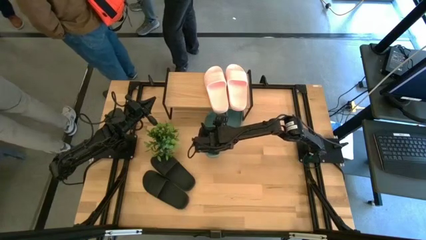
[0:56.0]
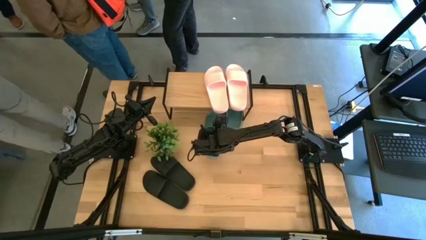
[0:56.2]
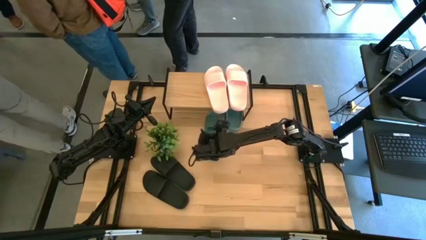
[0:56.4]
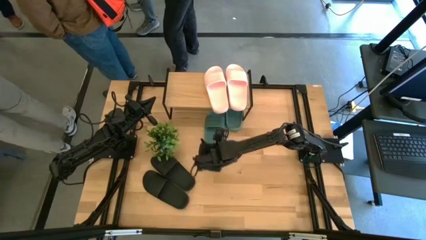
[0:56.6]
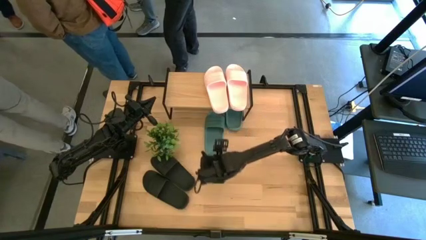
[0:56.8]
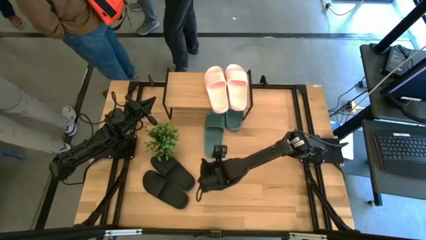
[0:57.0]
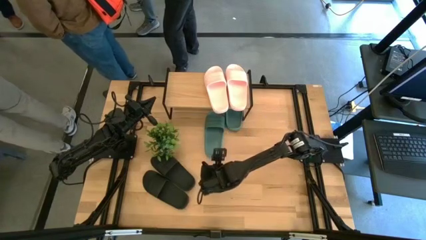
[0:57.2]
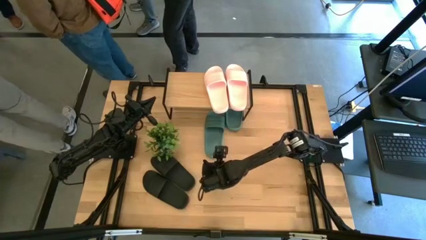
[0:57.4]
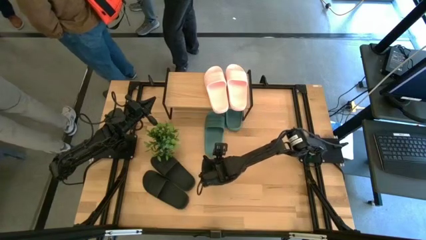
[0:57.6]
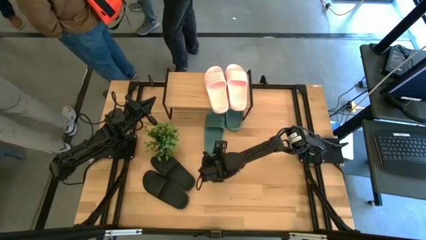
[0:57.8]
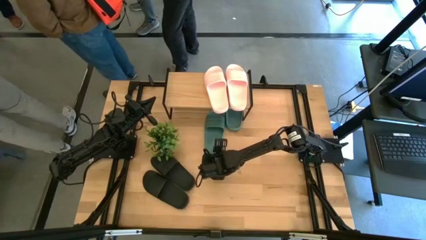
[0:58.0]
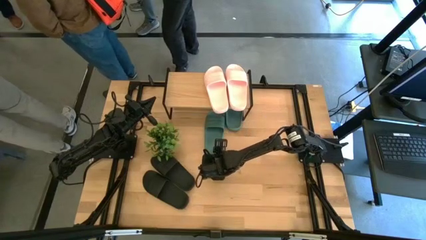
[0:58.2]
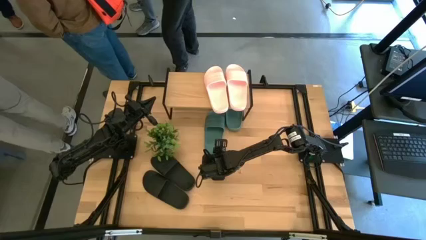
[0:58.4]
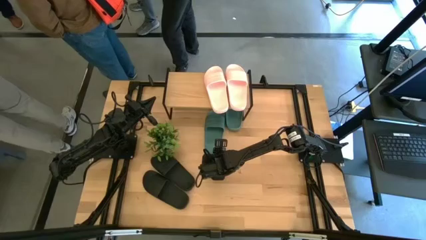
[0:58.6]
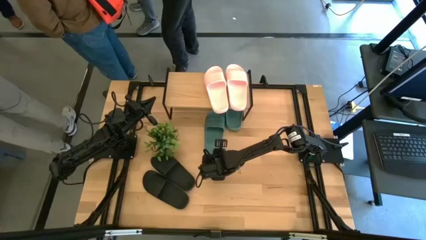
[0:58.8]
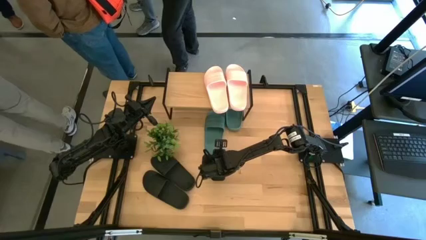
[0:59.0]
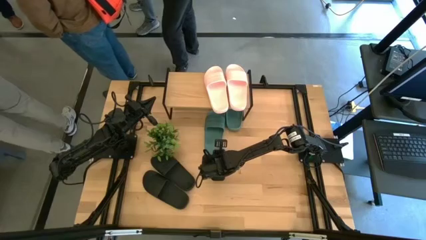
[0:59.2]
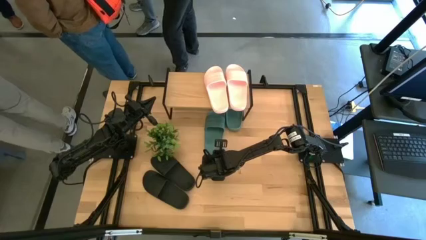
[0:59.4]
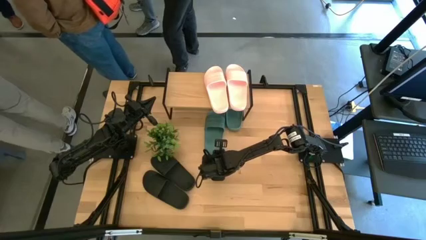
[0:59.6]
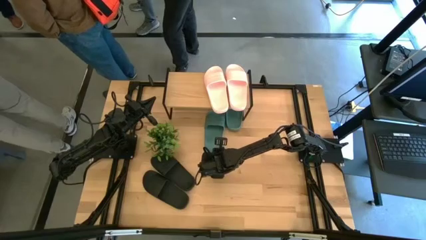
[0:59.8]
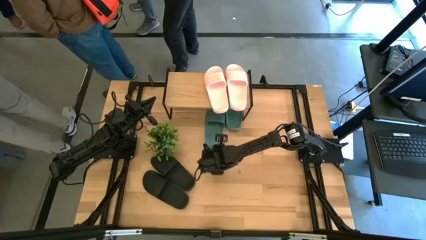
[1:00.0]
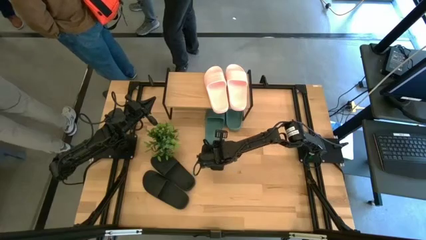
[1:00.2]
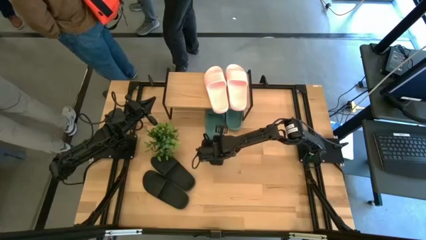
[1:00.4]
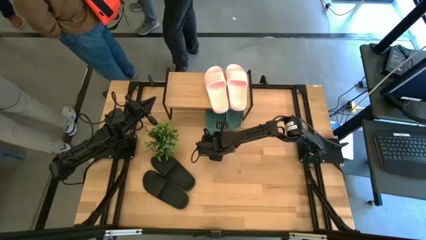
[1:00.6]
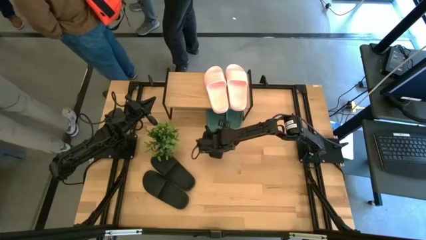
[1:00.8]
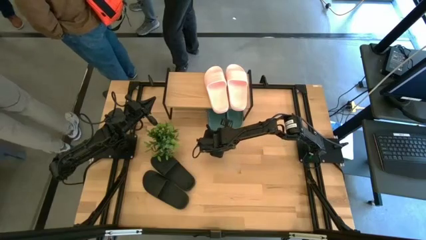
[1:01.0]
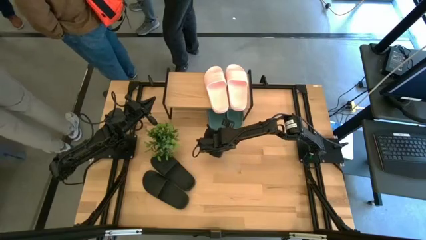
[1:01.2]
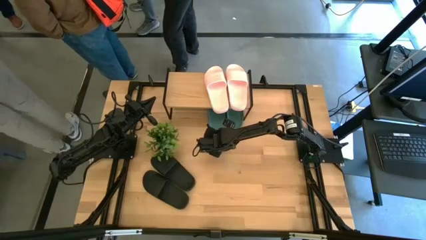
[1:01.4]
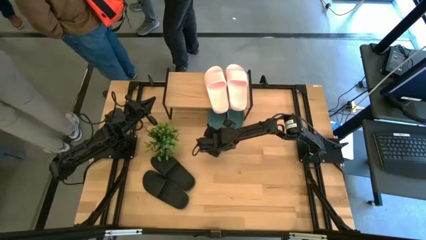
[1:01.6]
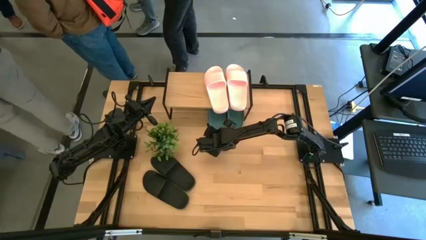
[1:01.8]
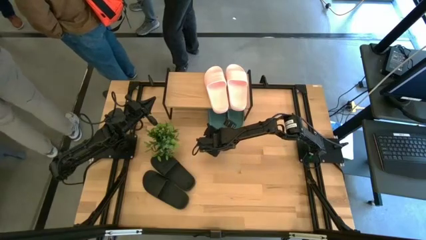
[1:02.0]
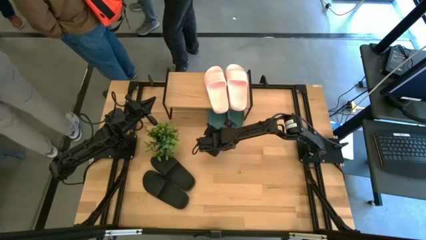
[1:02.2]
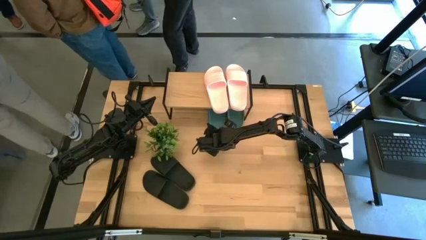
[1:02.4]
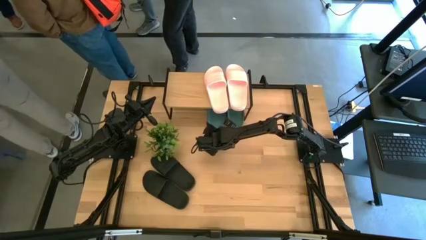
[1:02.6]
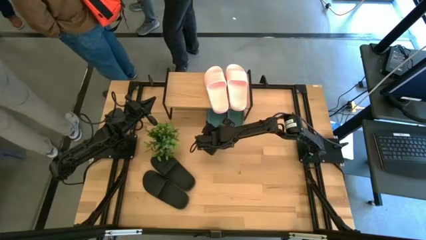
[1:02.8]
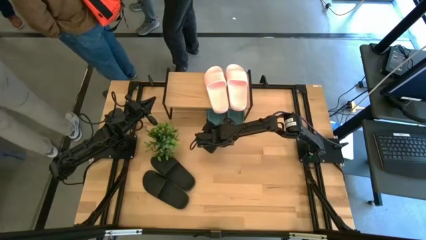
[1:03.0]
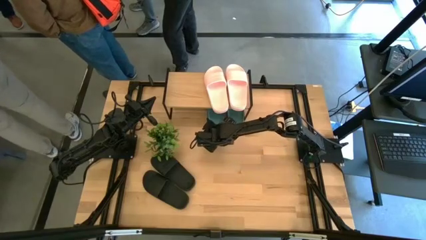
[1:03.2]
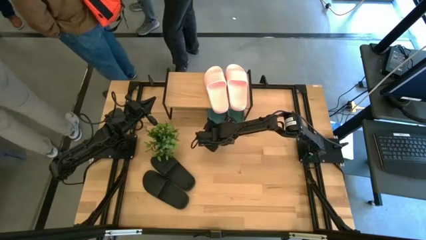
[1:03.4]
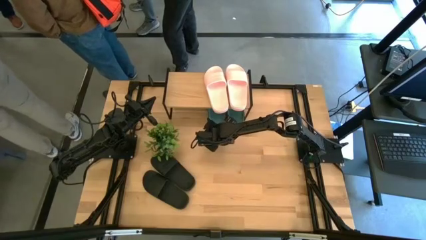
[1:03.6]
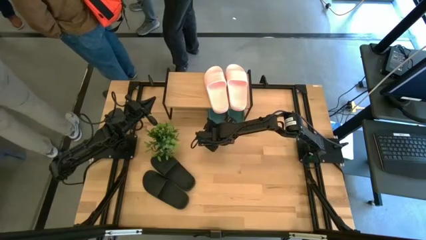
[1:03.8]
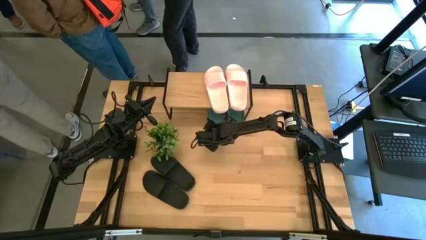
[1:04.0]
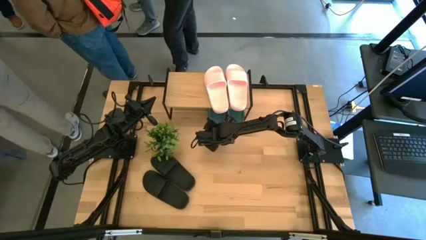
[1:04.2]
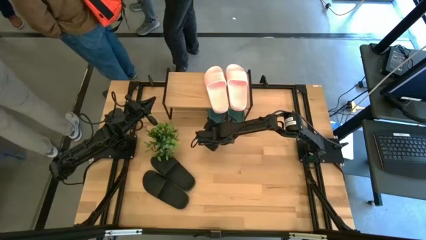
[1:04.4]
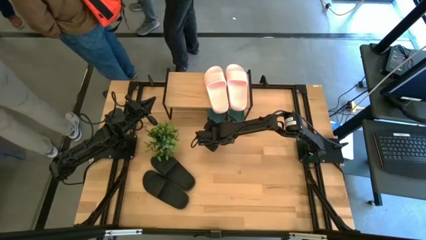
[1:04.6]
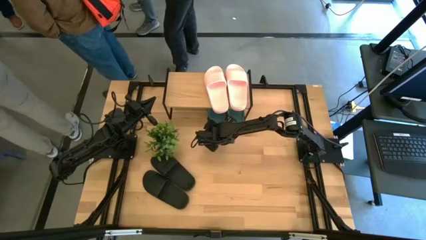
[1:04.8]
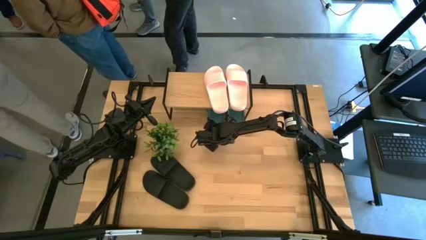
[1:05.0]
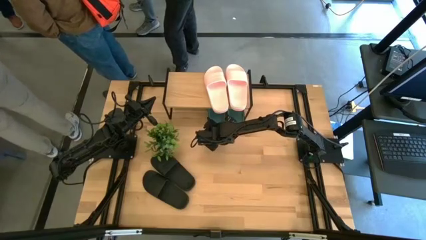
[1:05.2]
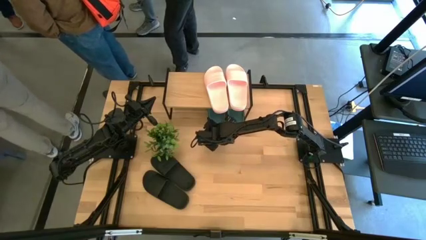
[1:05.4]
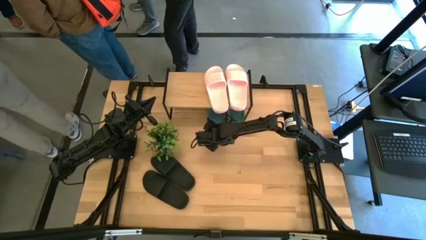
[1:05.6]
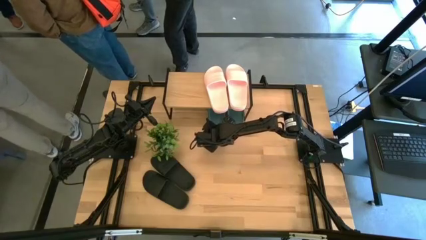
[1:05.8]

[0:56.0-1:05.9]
Task: Pick and place slides into the shelf
Put the green slide under the shelf

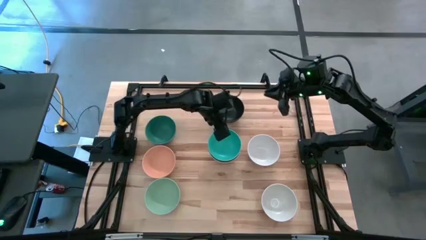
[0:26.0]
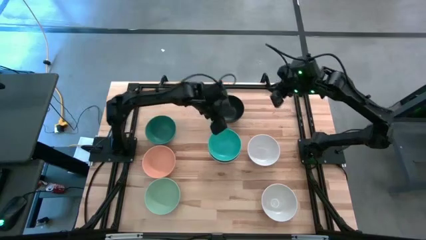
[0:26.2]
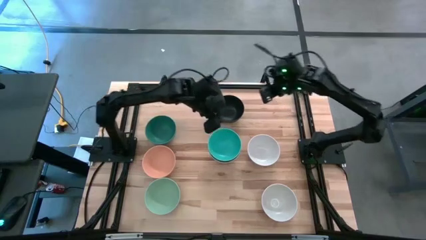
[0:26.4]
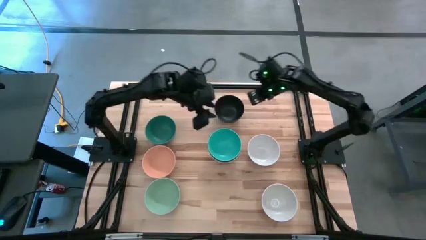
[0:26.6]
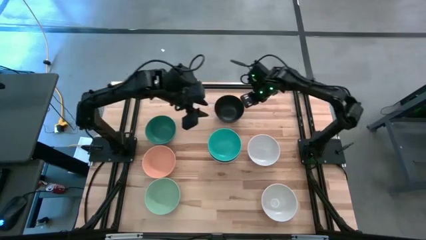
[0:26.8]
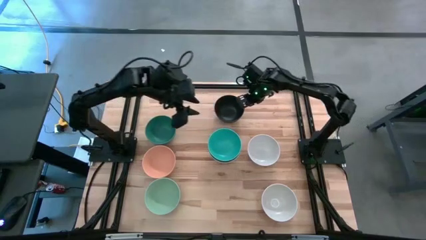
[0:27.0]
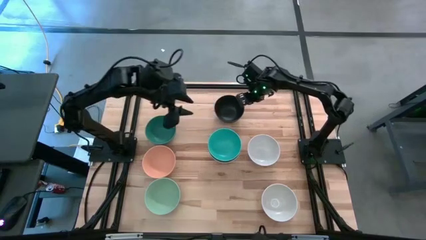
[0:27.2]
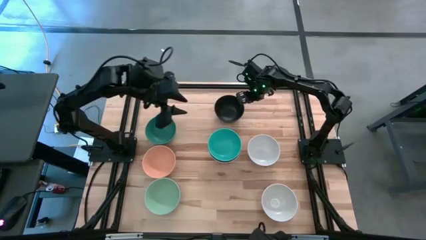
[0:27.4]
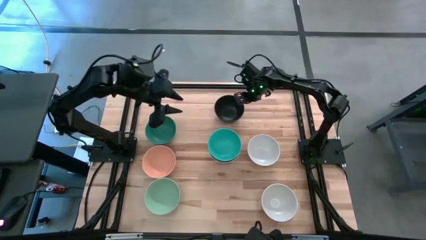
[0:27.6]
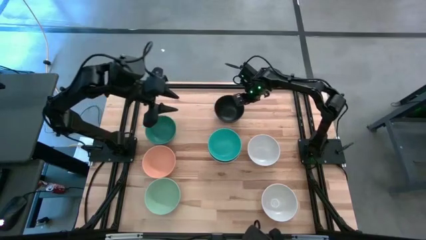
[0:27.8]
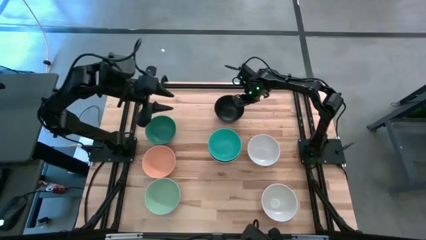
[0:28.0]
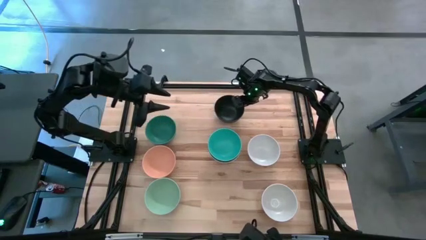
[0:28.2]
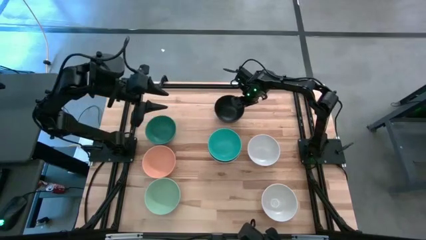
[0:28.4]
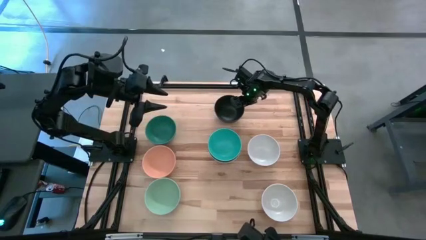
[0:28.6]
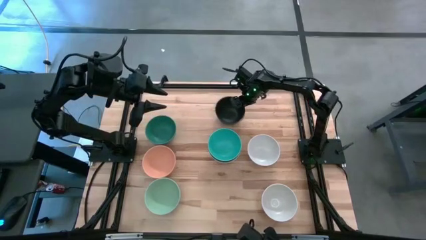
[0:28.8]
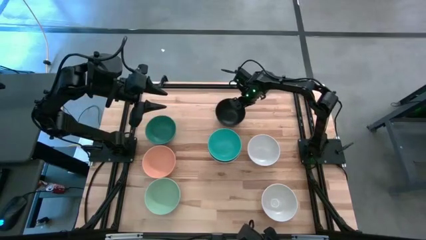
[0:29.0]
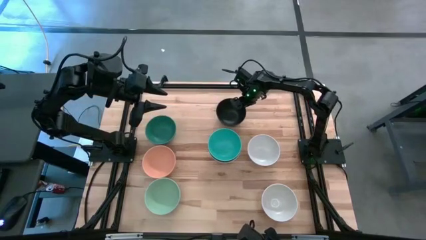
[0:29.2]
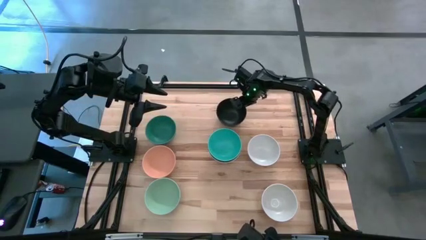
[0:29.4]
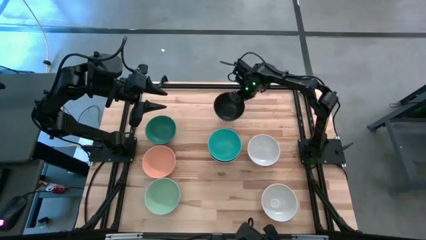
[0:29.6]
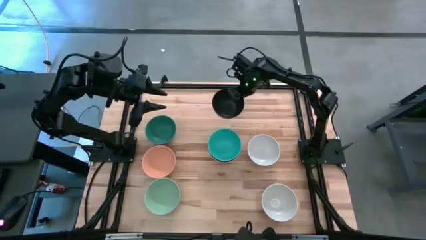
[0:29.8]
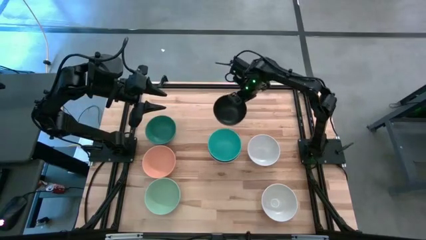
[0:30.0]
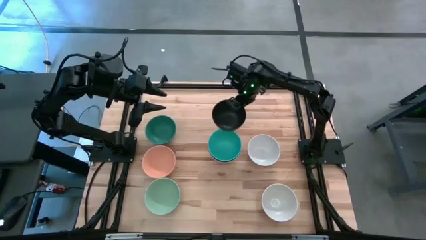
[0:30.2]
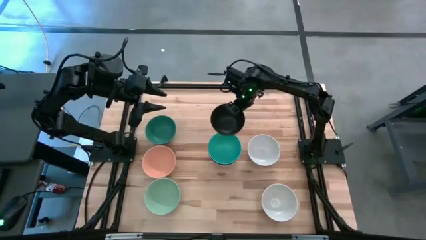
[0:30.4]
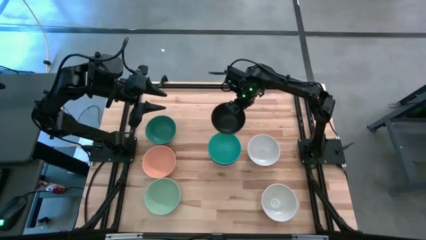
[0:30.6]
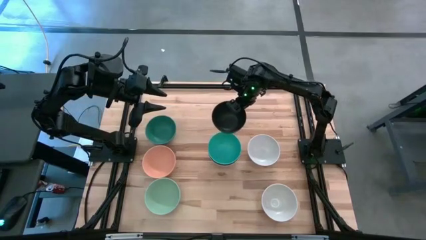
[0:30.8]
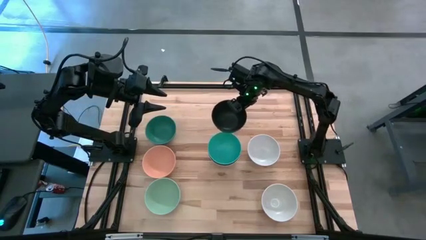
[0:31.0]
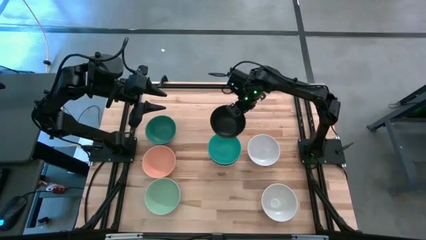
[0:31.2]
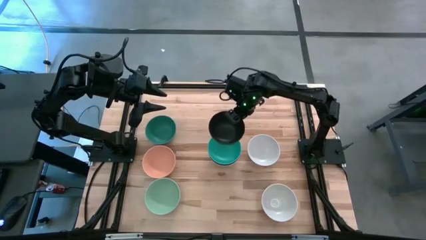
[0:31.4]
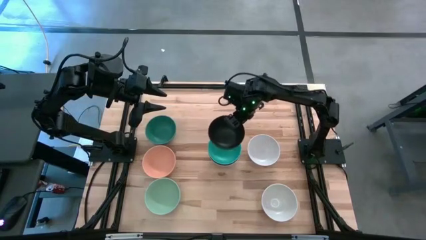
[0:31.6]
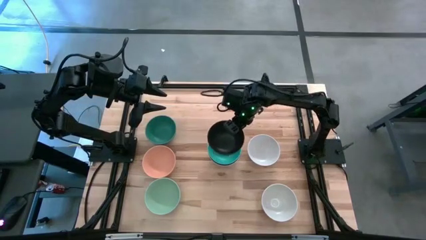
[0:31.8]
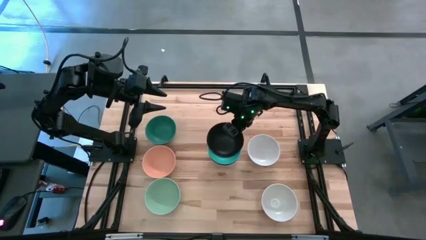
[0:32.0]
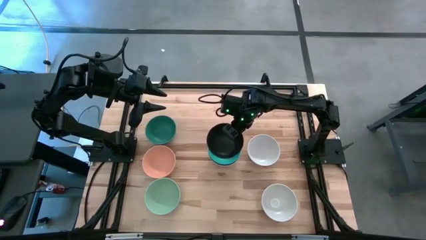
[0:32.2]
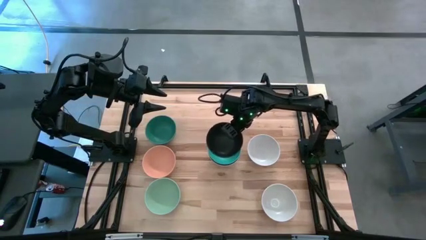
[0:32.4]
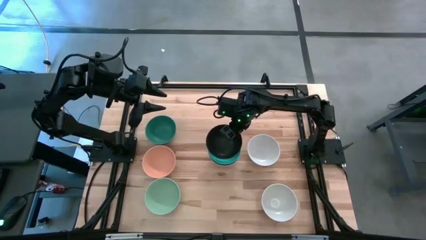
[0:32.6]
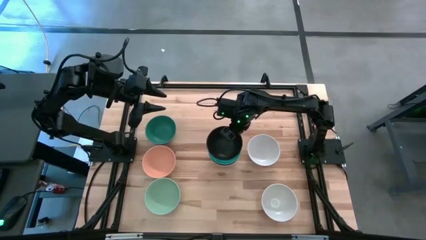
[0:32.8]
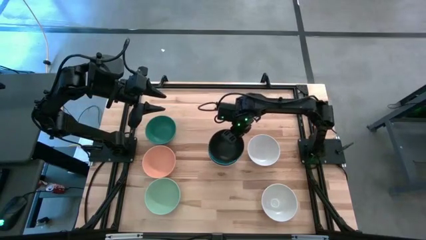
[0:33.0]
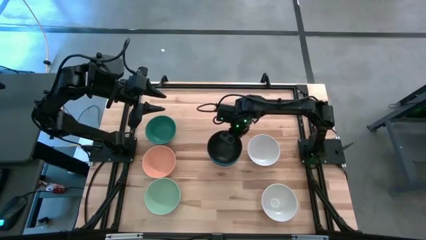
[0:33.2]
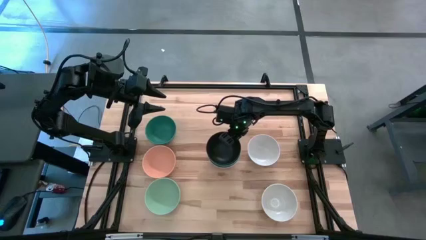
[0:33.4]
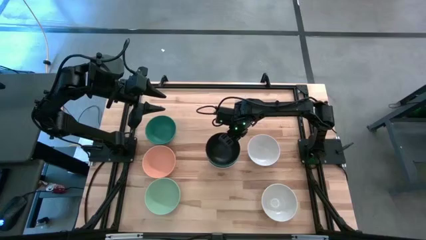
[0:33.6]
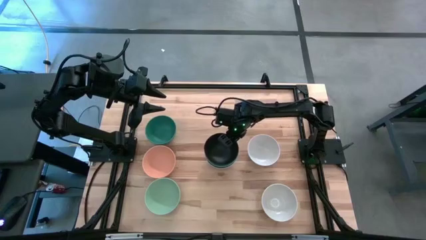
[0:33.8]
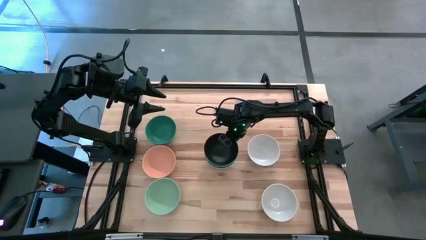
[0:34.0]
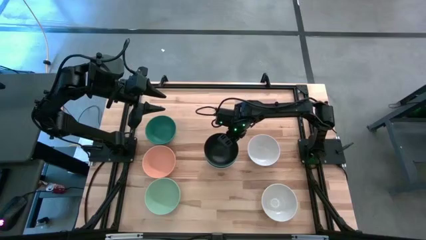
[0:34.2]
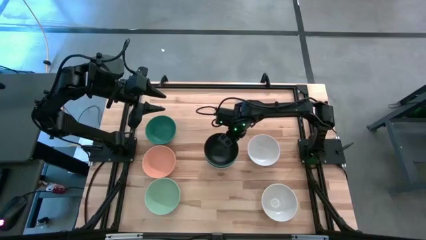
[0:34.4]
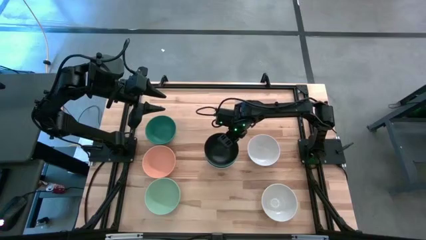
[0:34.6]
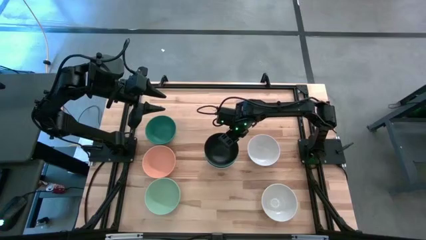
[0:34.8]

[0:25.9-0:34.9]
Task: Nest bowls inside each other
Stack the black bowl on top of the blue bowl
